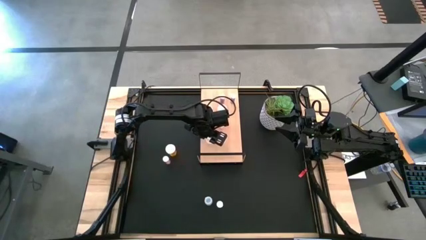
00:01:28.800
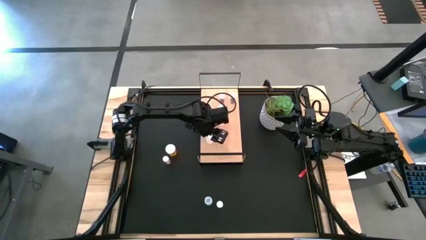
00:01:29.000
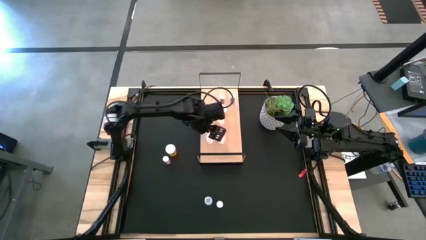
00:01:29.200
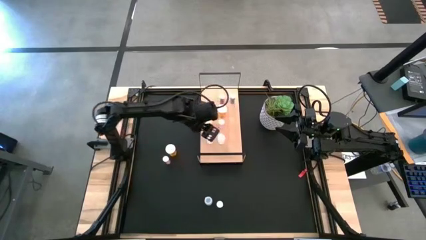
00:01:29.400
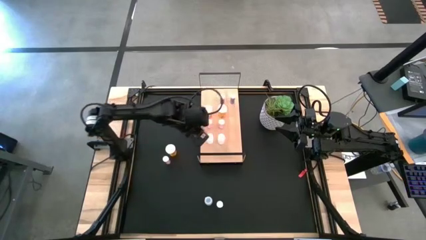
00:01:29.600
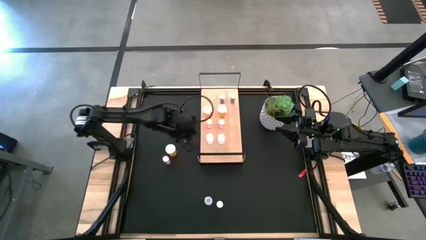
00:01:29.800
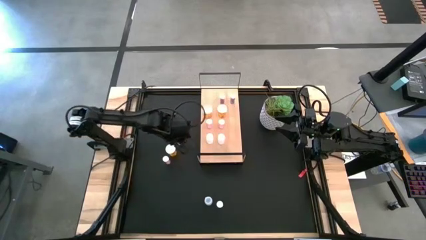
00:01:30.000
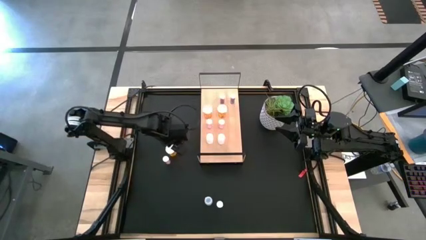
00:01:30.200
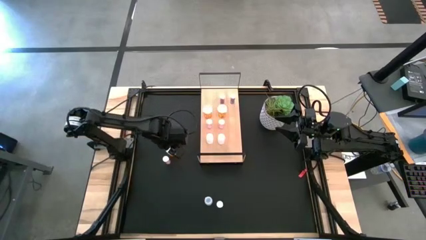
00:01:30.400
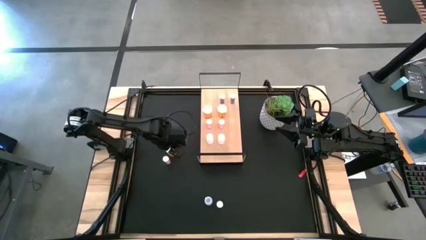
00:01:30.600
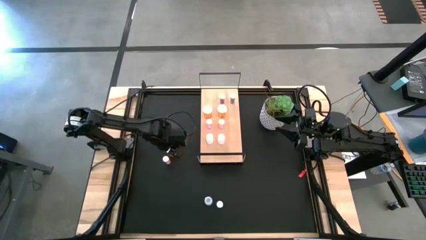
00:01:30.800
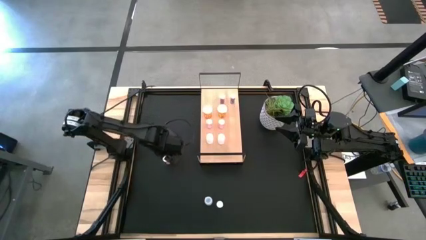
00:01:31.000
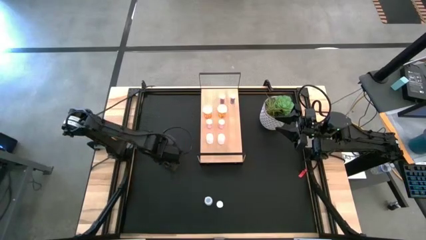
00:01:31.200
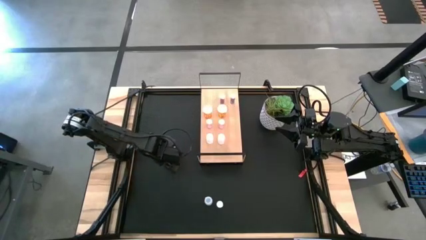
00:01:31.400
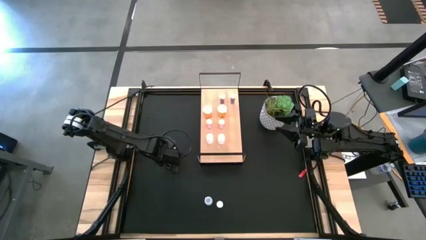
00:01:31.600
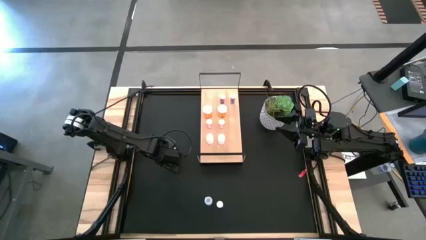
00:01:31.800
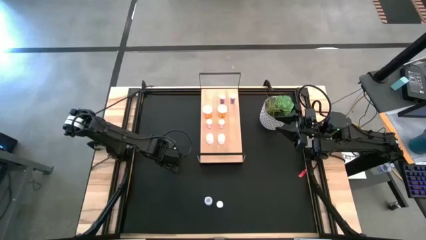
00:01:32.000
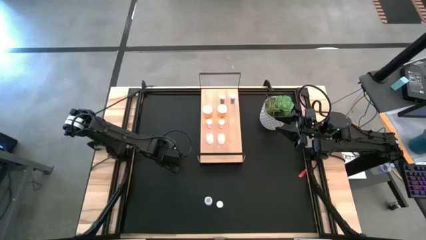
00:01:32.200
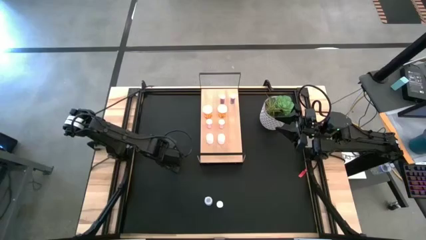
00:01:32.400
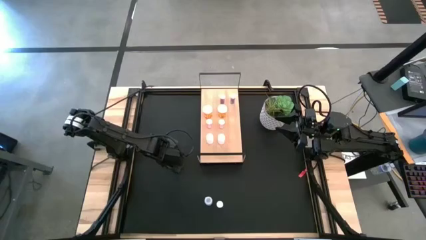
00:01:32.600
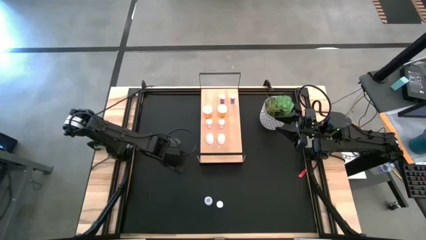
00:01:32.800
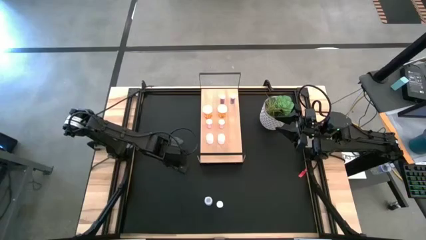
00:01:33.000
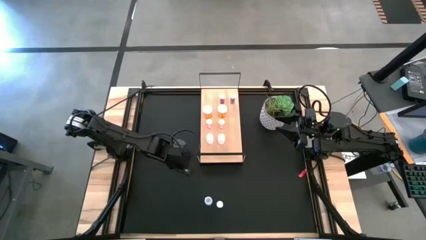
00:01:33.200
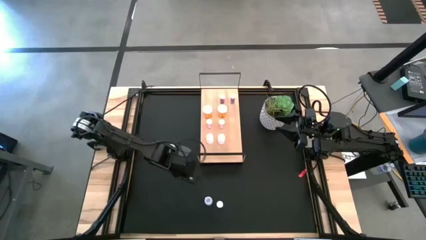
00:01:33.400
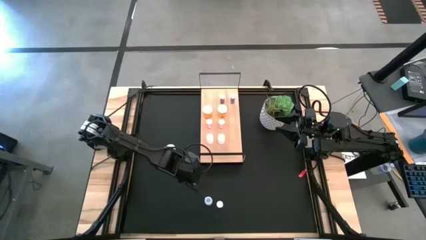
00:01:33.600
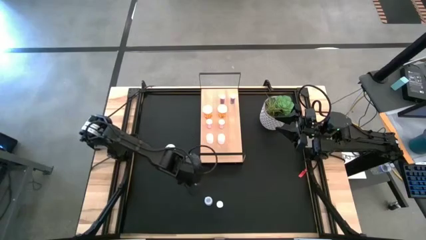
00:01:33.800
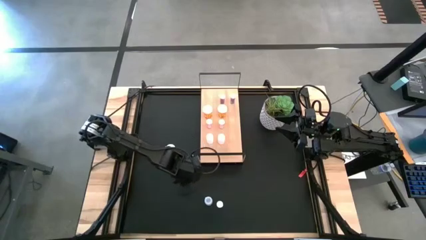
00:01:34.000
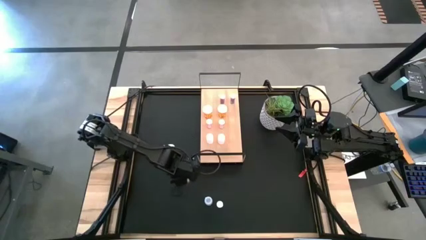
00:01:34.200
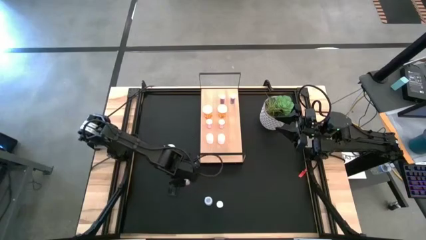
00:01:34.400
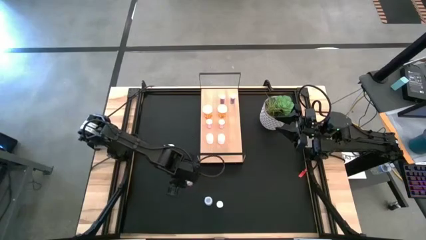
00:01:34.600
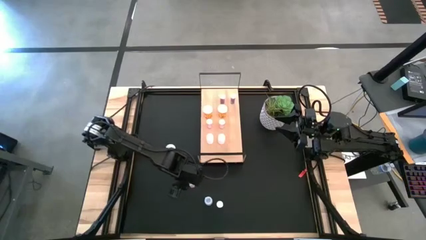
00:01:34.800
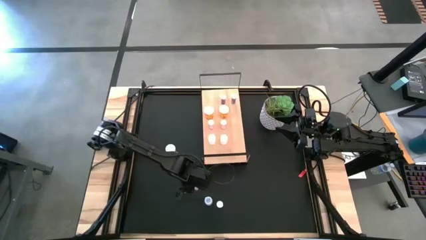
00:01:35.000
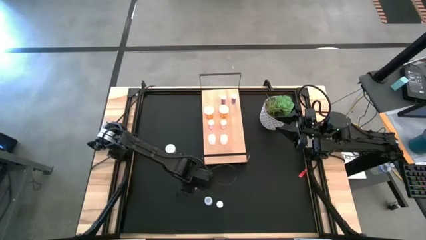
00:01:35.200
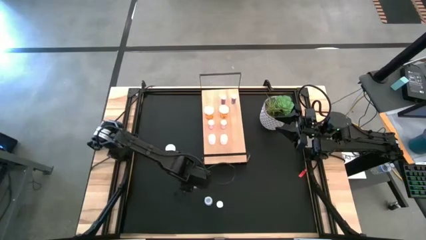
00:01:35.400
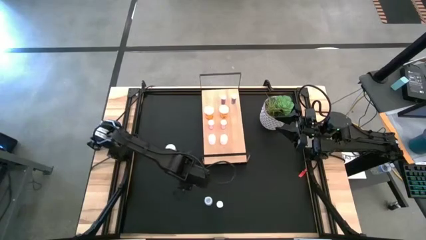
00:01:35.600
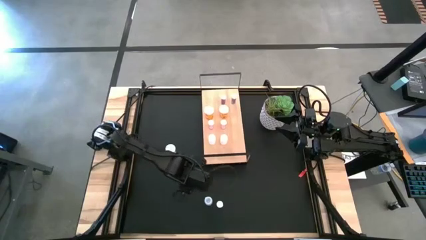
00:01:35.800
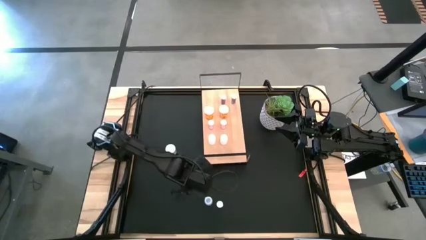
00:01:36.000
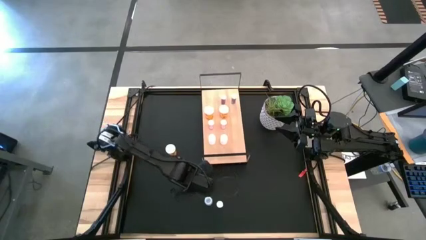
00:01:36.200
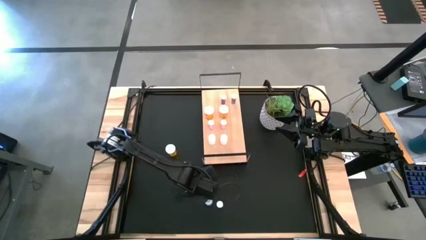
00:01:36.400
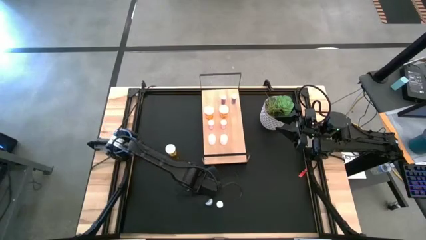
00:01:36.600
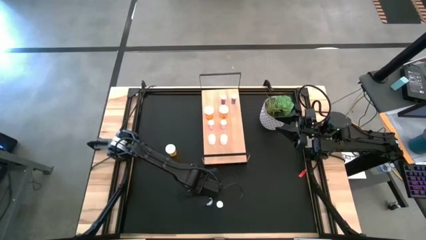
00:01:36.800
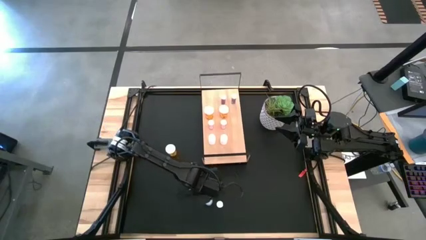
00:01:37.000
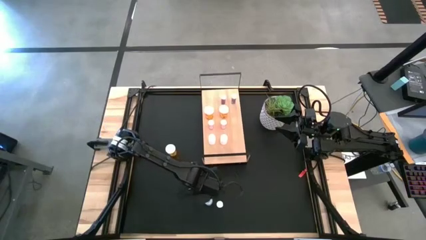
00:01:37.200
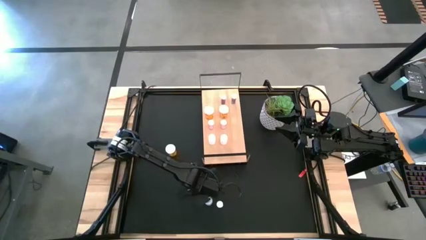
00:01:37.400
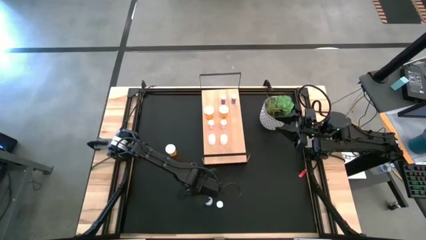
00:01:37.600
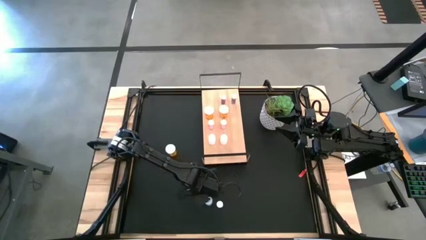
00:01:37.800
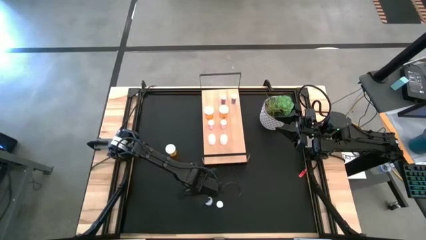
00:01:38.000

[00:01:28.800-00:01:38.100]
Task: Pick and place medicine bottles onto shelf by color
Move the pink pill bottle to the bottom middle of the table

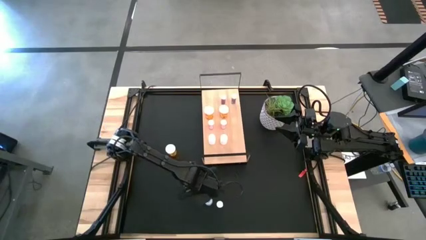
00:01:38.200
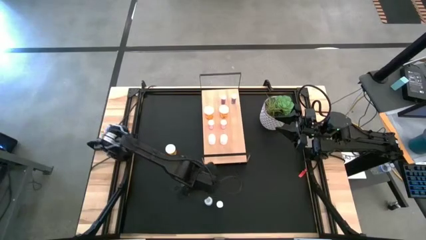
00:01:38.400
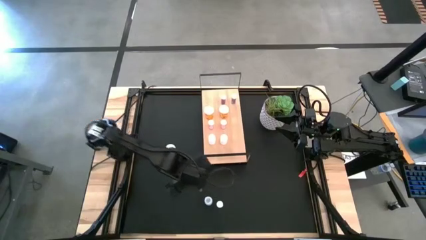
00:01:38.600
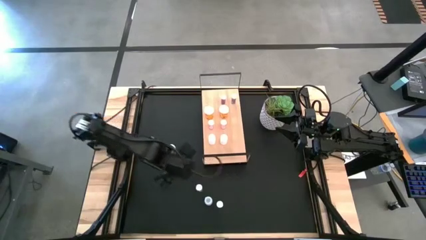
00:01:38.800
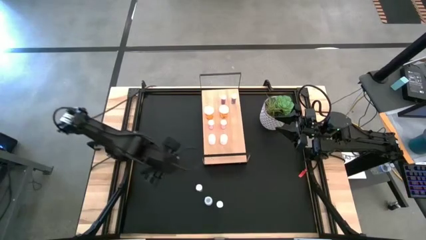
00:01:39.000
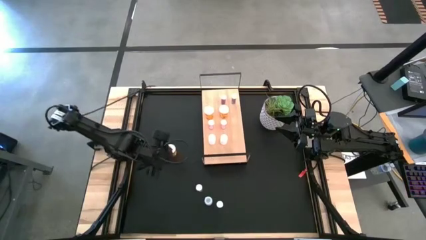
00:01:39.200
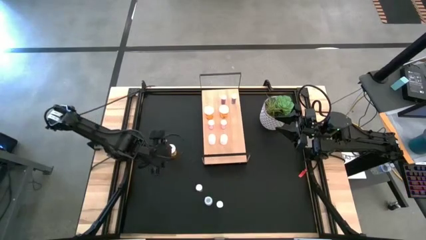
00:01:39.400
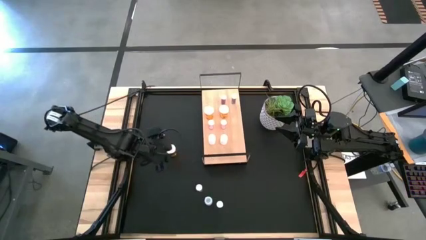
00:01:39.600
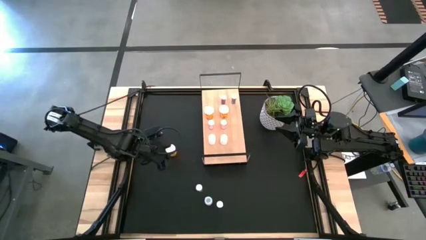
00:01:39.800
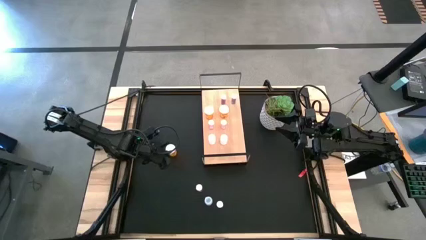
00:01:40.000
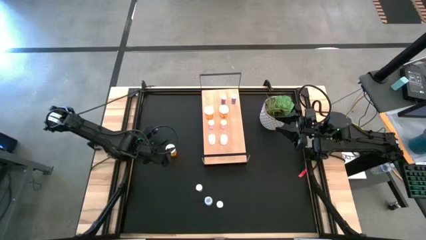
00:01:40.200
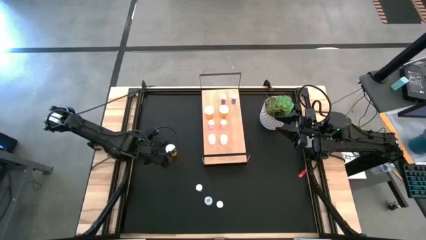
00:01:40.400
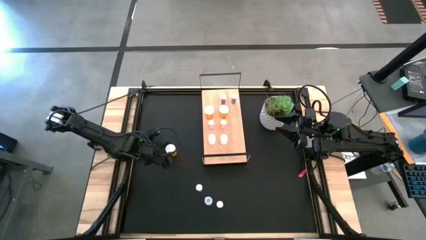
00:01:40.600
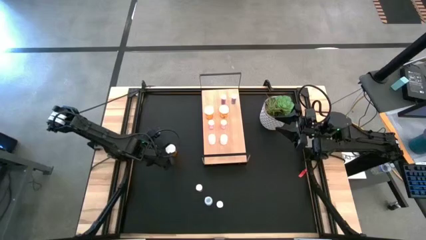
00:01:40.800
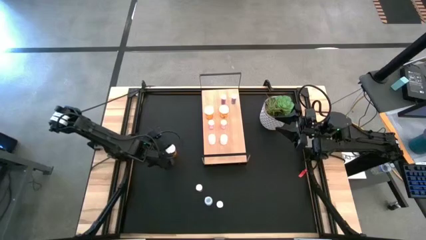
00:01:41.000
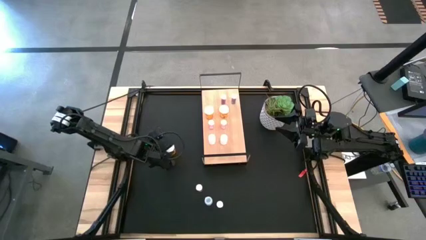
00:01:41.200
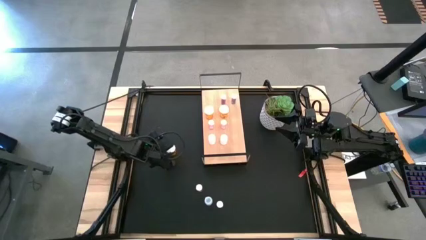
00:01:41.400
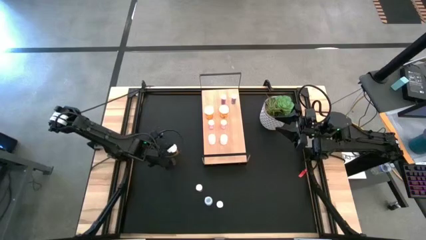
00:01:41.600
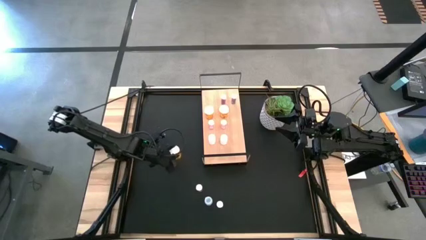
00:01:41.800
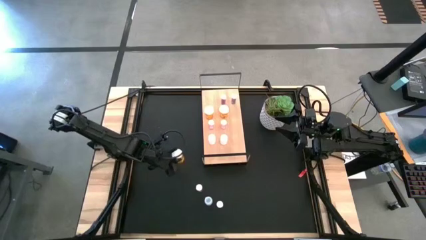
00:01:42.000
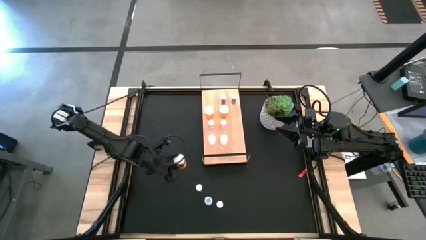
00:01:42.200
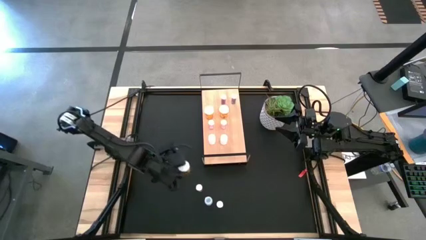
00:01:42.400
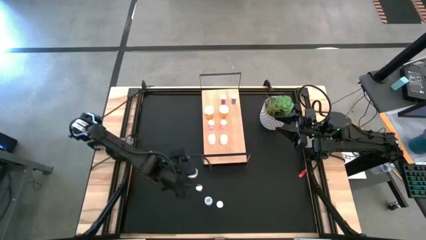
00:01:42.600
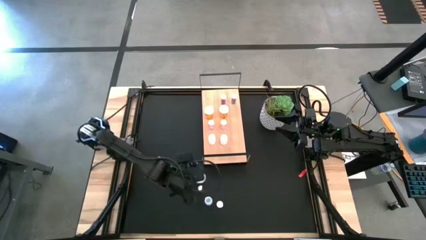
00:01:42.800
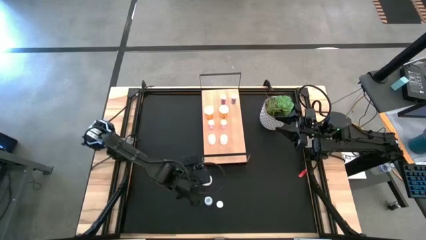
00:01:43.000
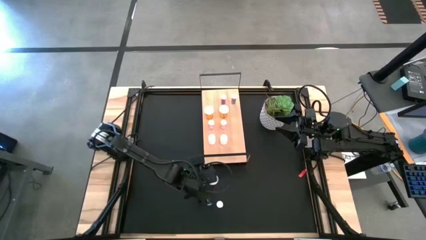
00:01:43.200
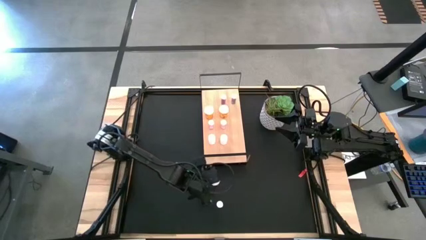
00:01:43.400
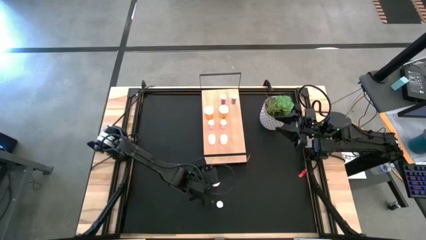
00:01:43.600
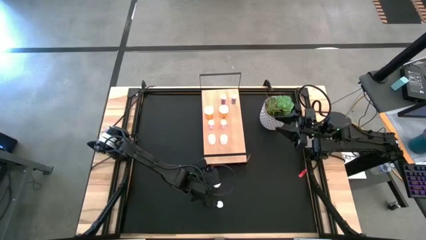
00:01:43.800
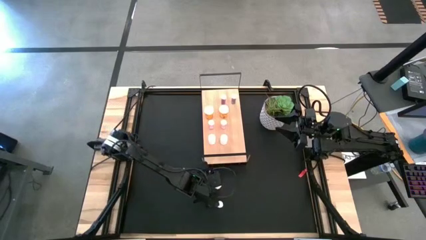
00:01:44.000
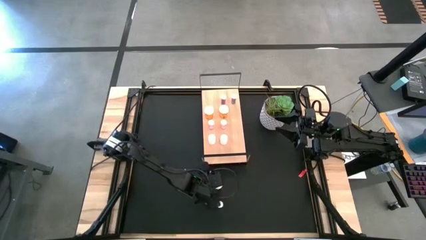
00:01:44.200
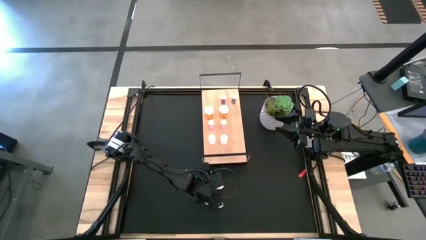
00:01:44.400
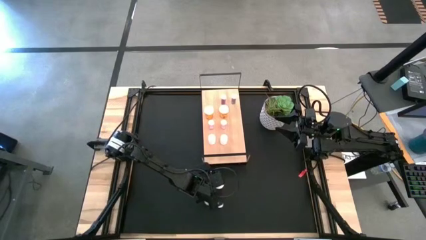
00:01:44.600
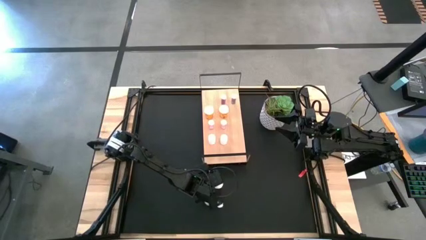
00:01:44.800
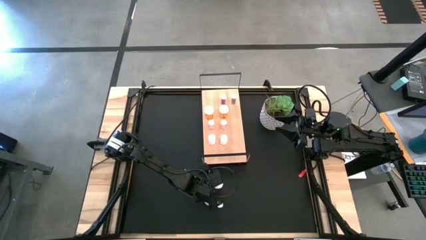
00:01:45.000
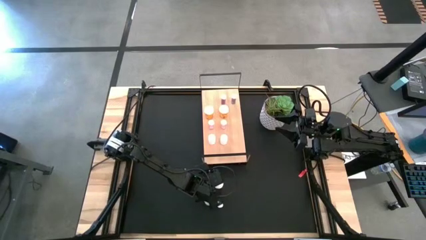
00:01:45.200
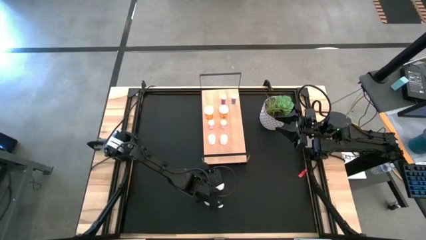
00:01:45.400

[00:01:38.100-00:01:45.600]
Move the orange pill bottle to the bottom middle of the table
